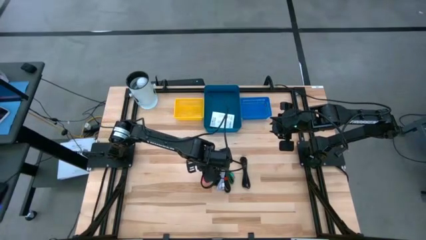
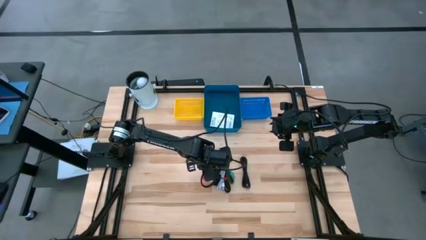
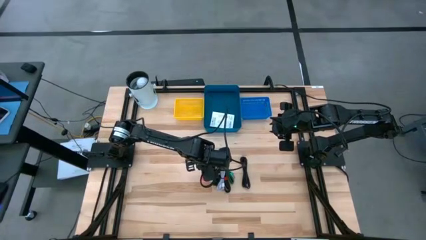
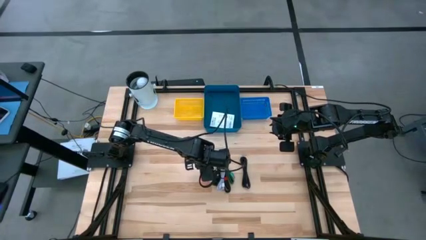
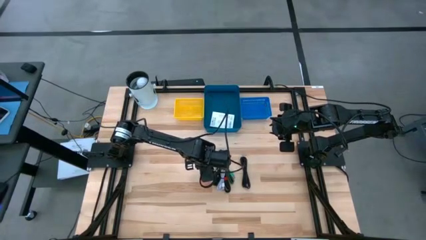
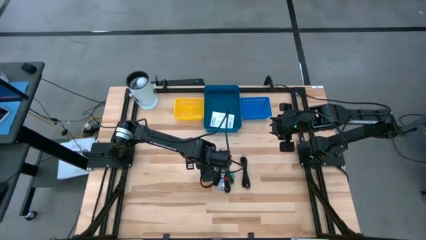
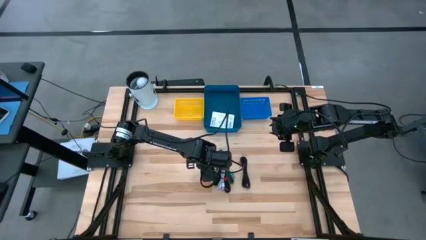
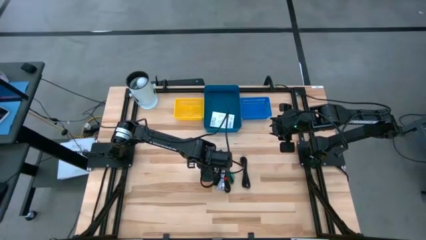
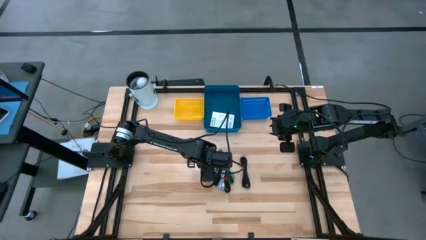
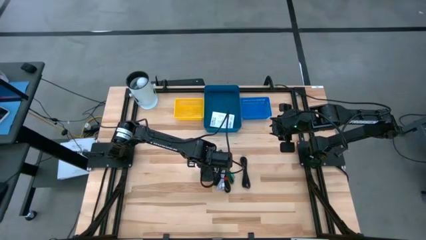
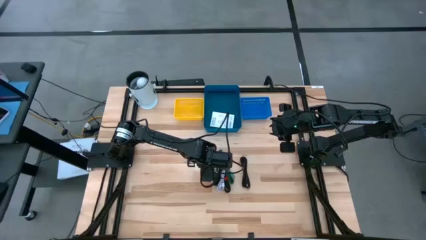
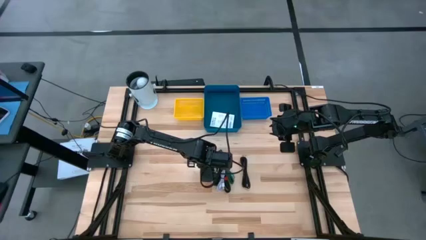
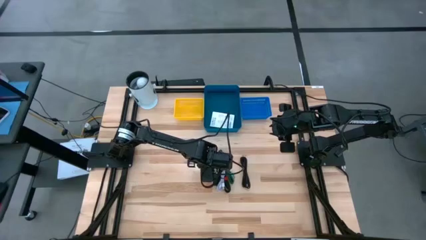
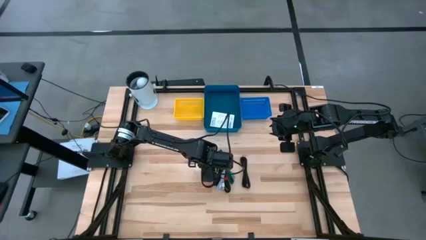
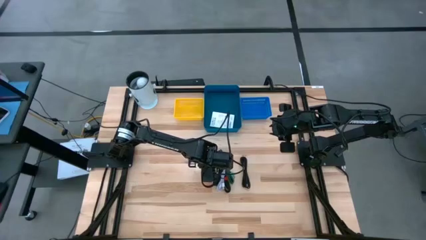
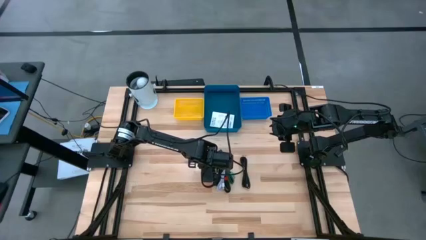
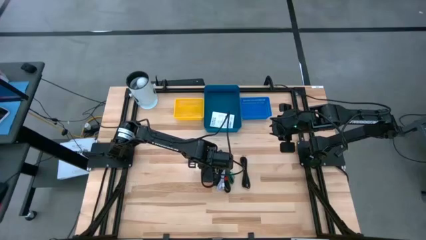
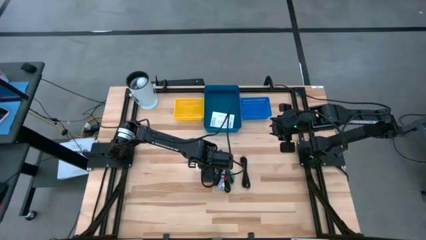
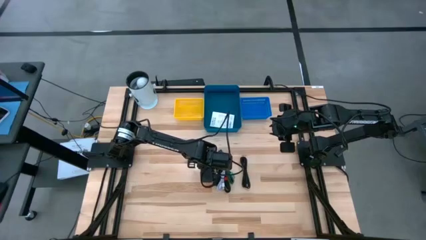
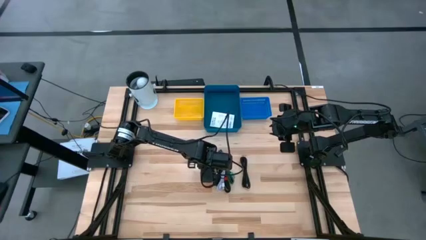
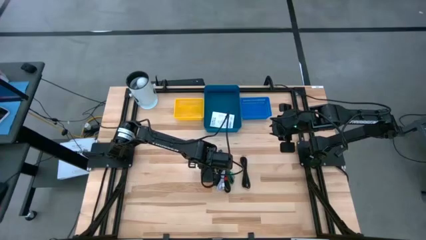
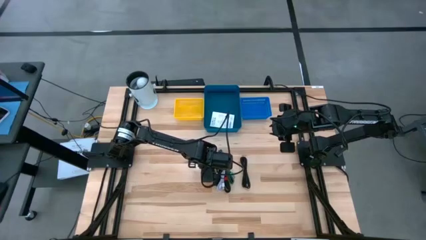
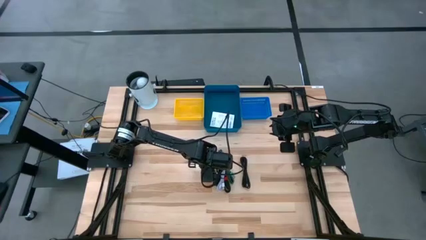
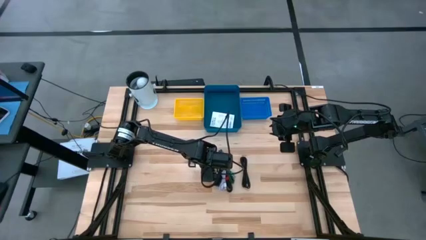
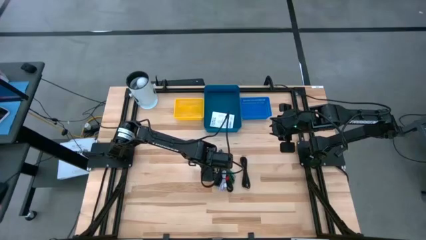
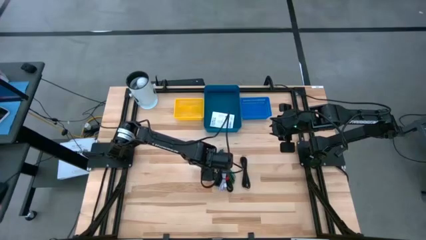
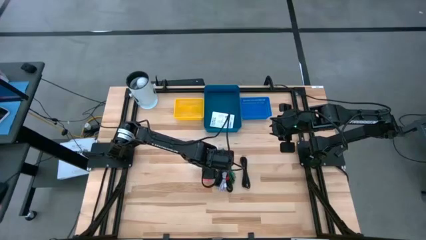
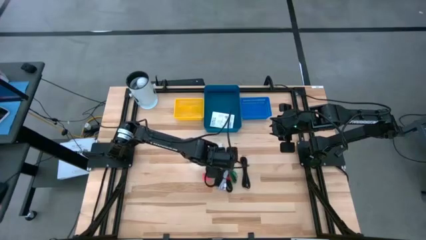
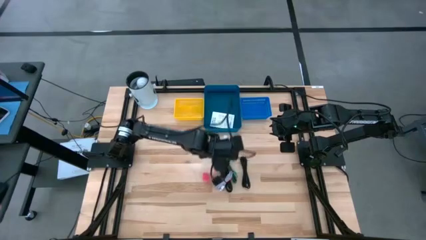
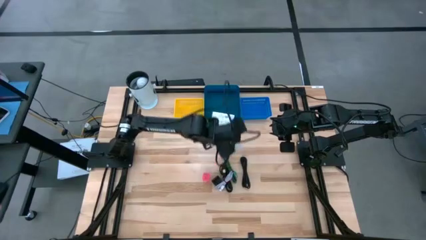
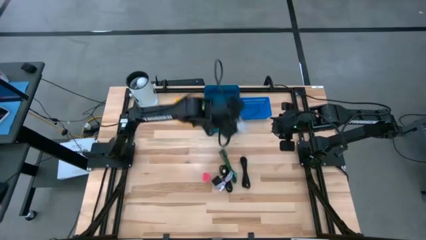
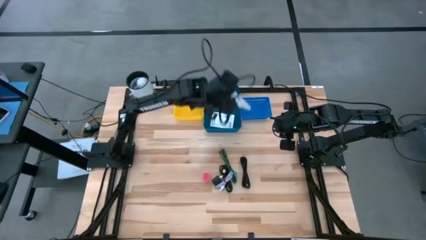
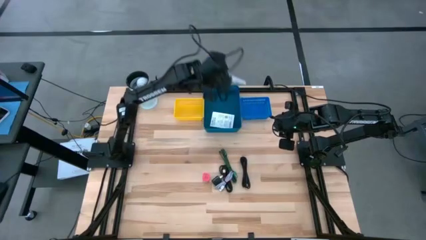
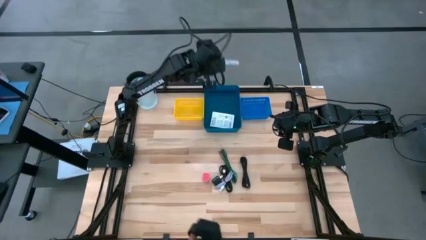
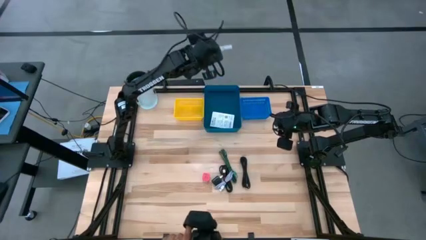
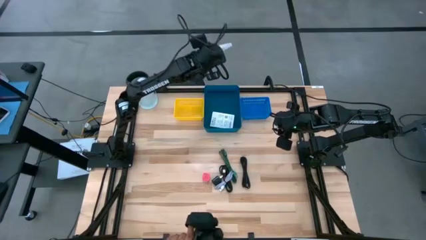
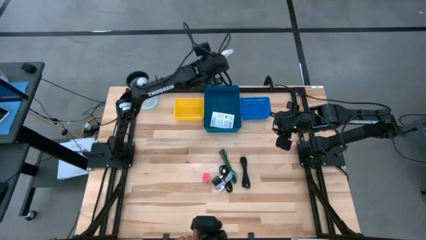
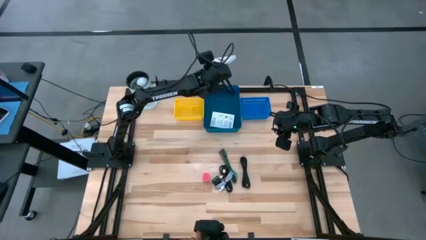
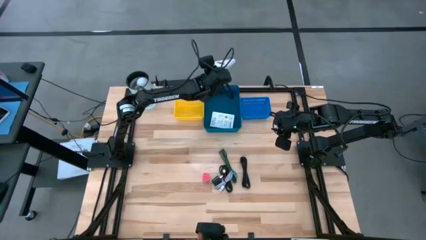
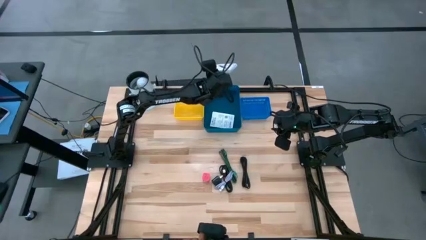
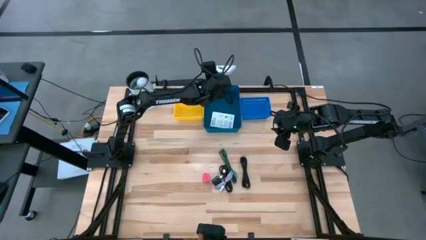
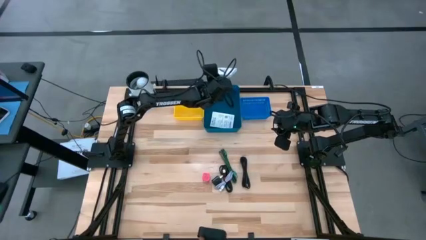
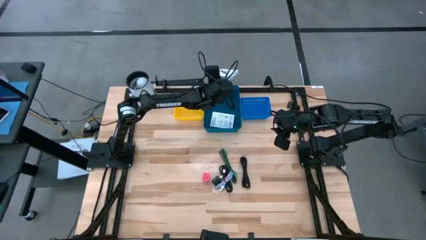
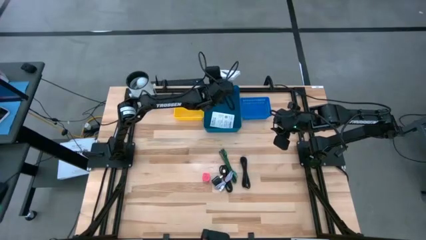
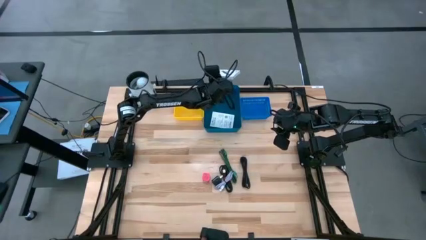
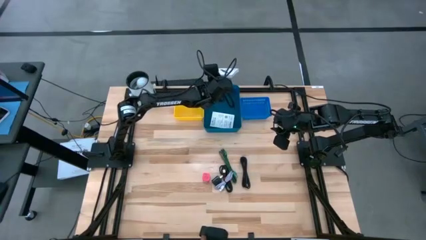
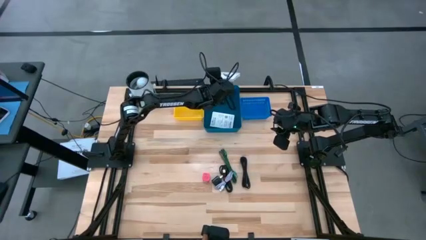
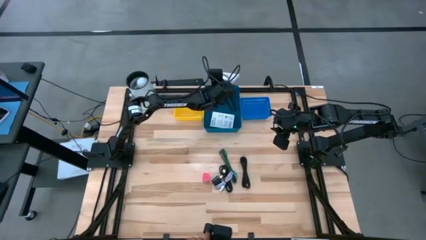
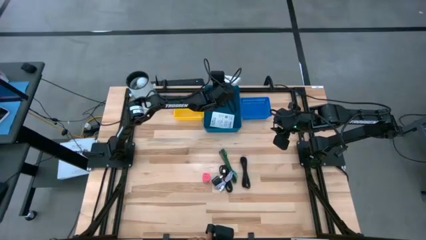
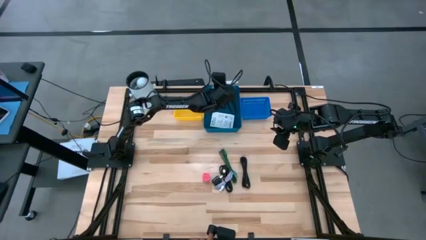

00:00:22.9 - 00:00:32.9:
Task: Pick and place items into bin
Put the white card reader box into the large blue bin

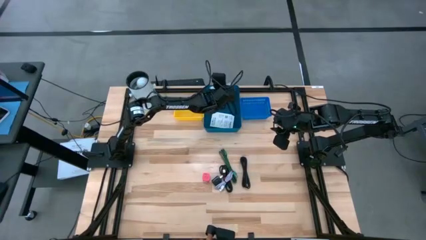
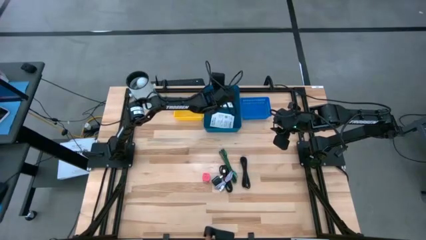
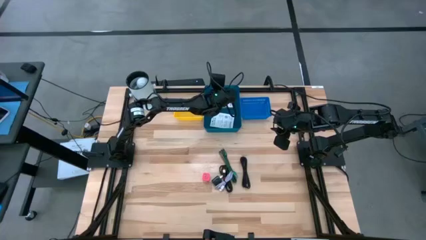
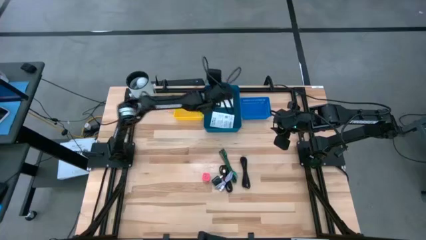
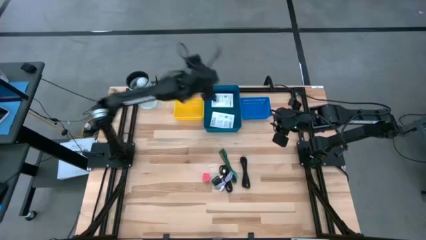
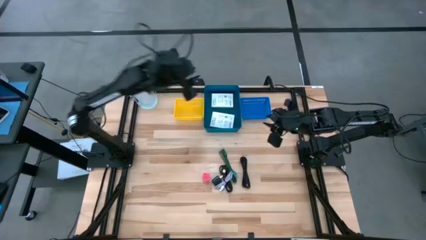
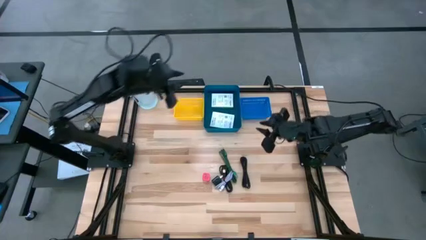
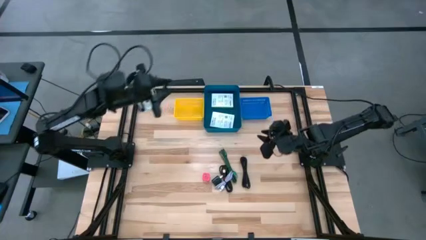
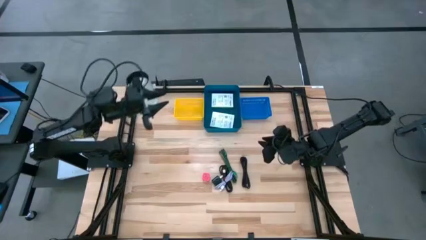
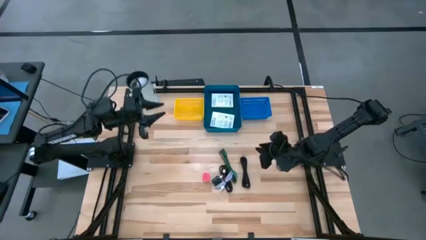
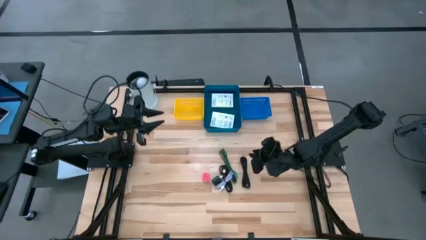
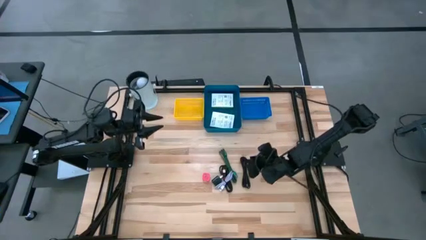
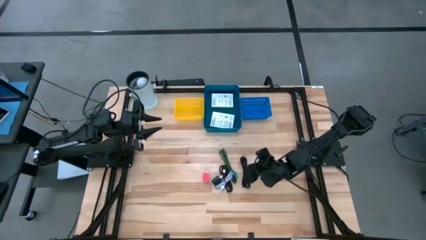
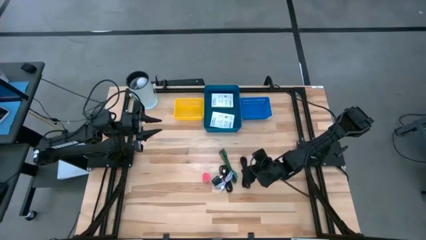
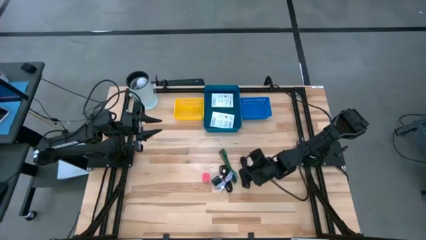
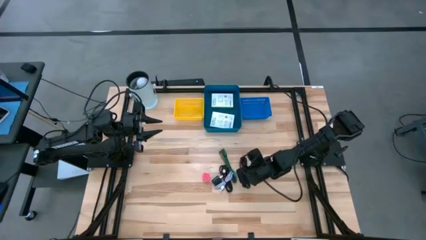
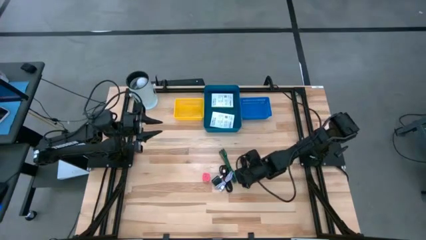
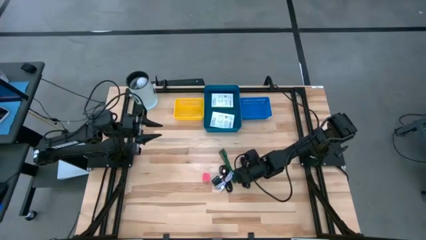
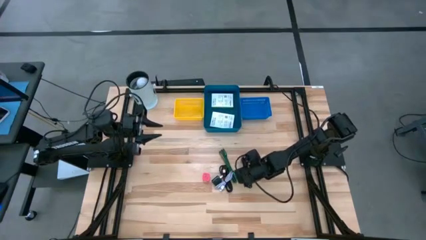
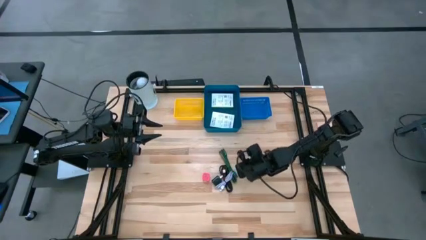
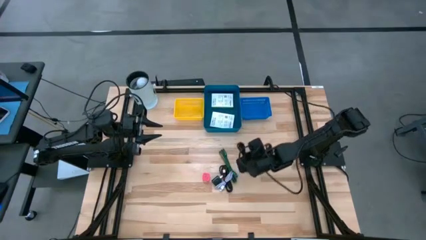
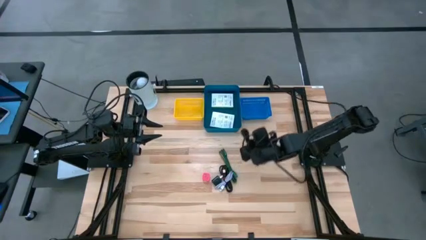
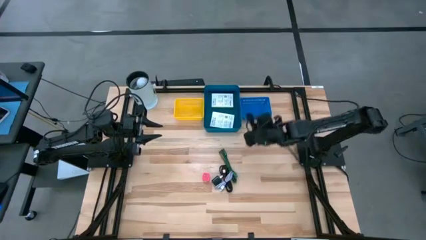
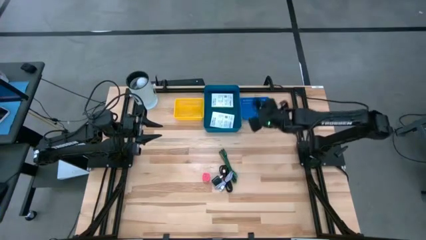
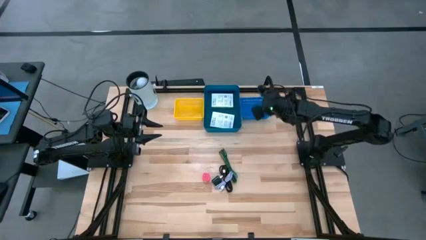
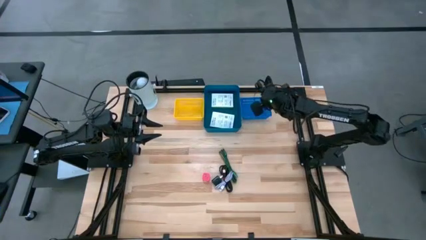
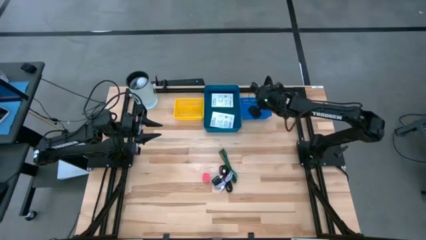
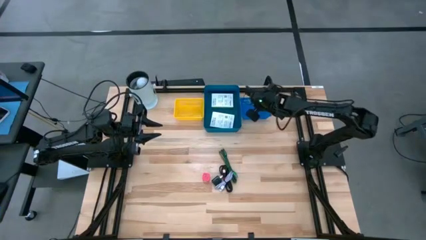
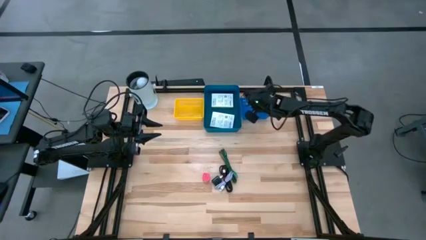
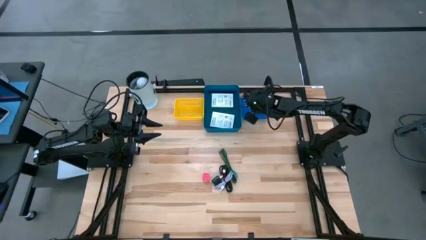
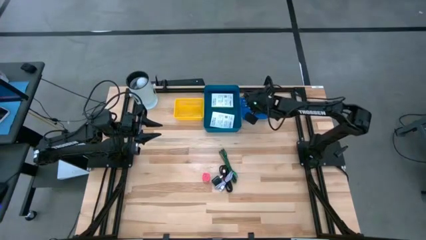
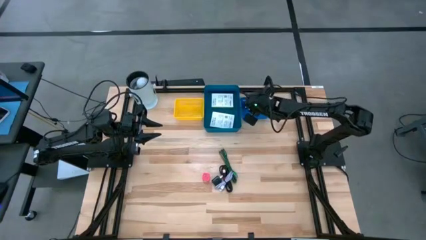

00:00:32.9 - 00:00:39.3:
Put the black charger cable into the small blue bin
